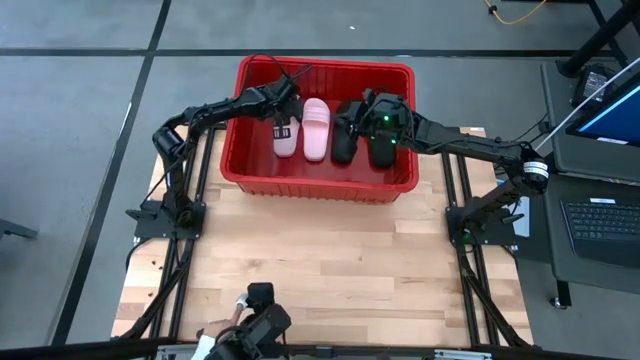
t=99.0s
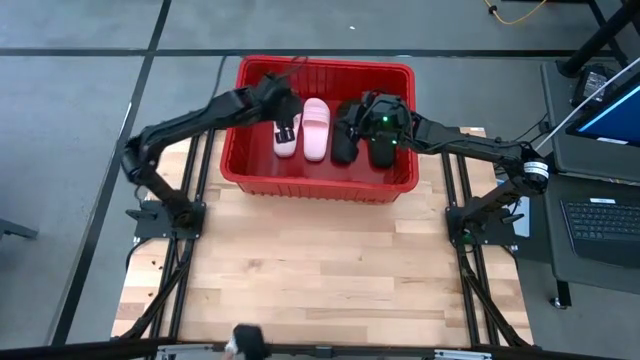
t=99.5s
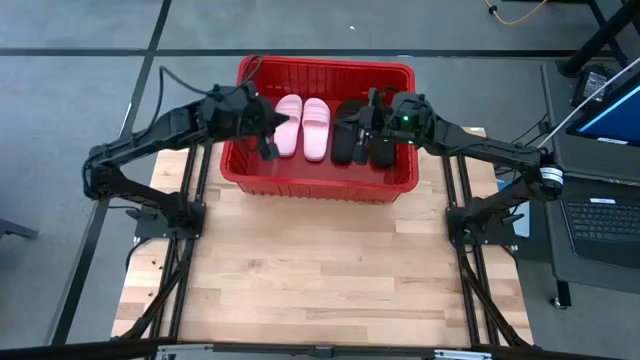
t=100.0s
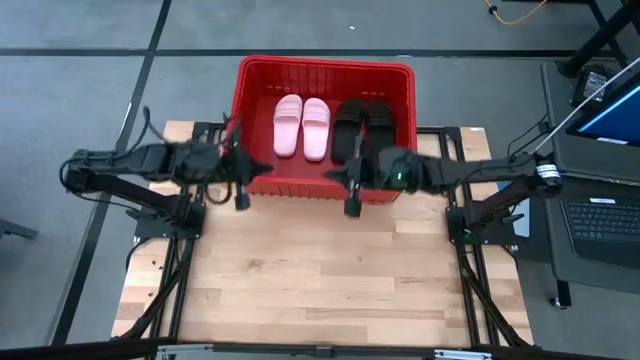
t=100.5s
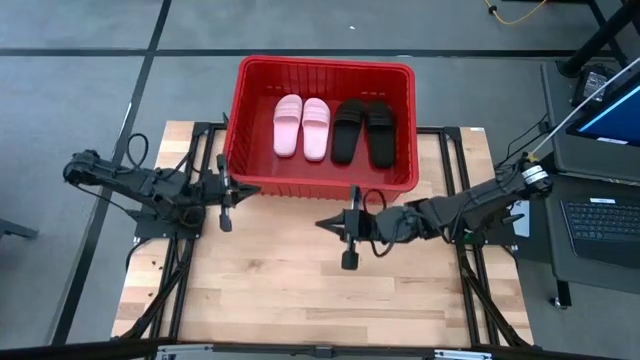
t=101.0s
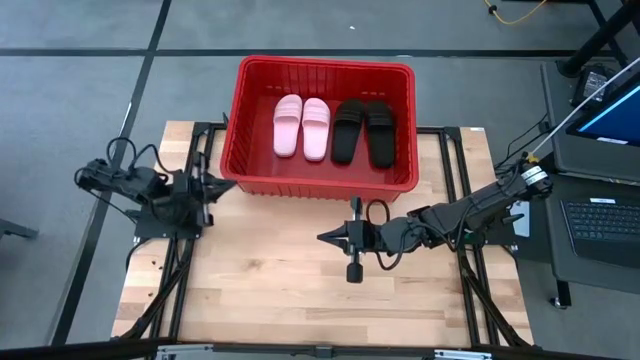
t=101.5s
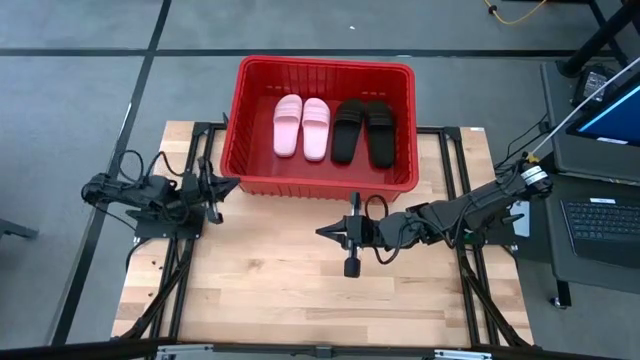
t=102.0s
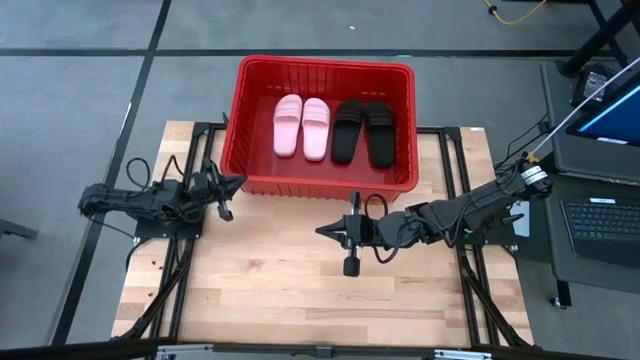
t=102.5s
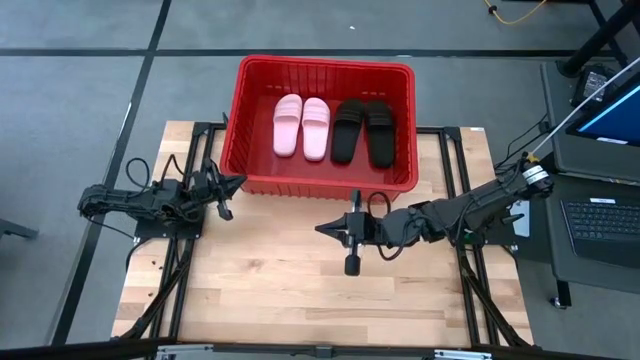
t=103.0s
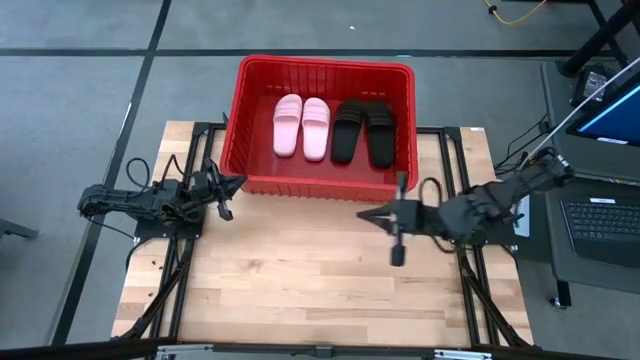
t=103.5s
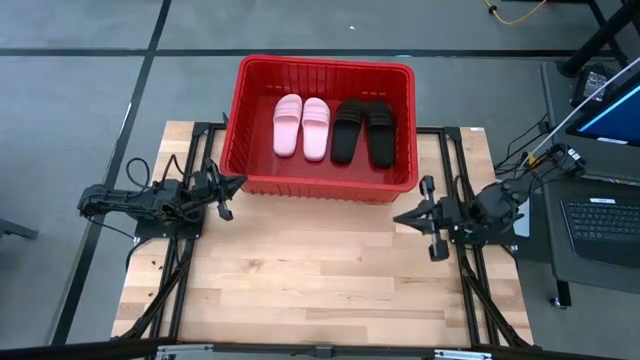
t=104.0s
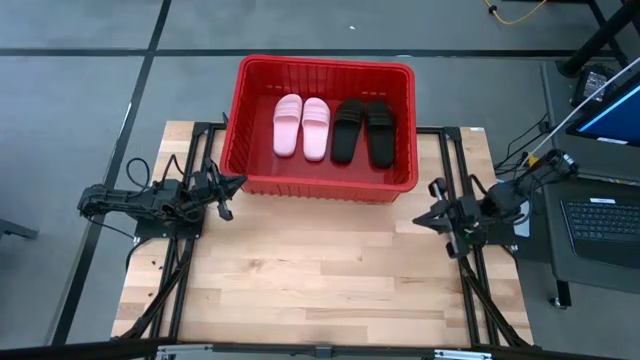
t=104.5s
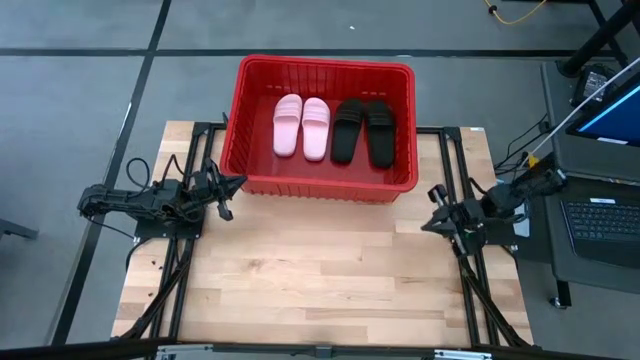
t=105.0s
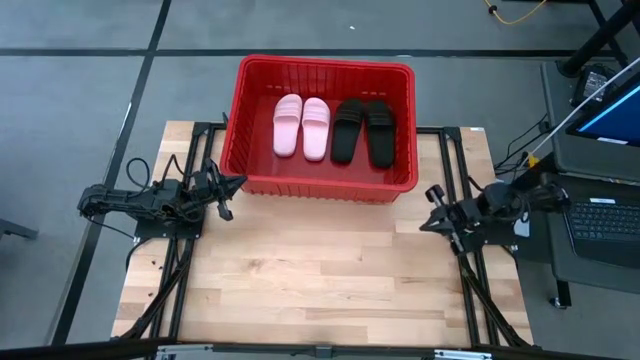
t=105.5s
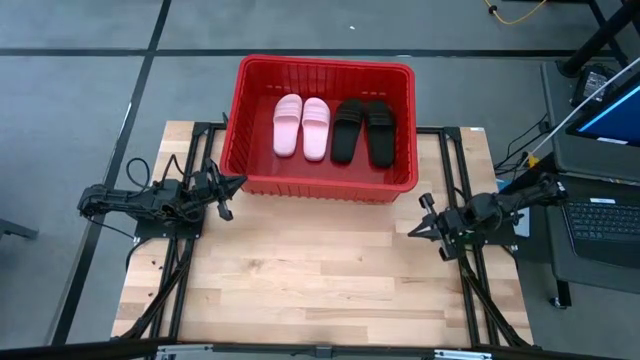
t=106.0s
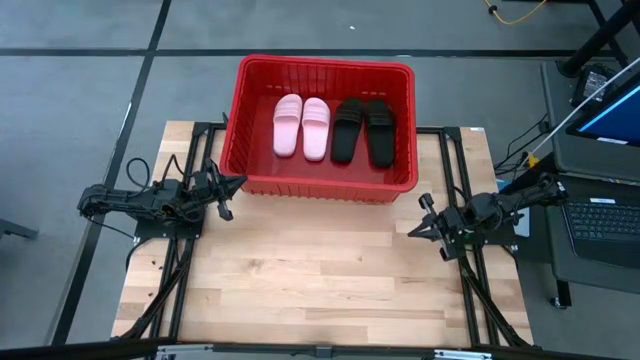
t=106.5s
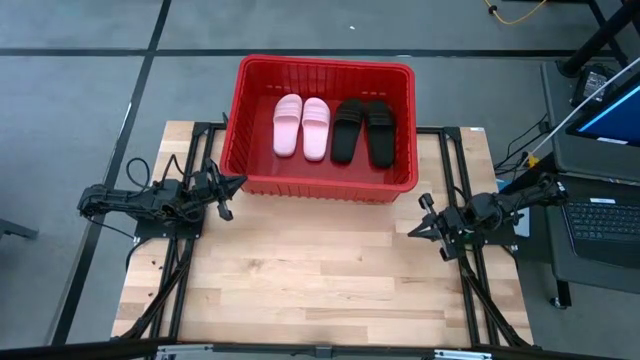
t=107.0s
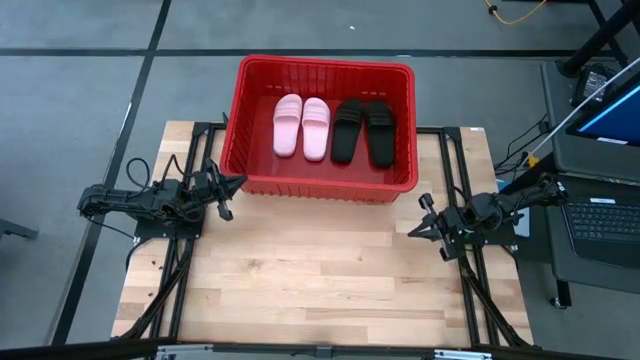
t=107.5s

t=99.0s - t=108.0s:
Task: Pick and place slides into bin
Return to Home Position

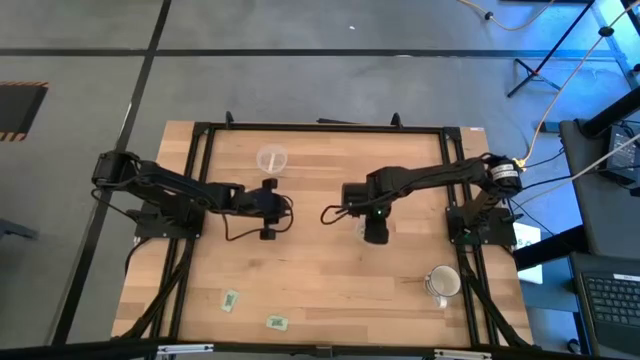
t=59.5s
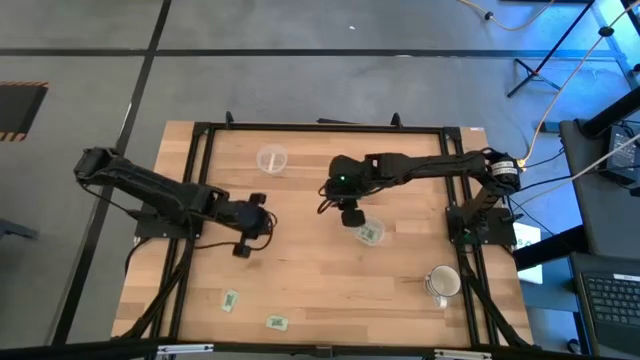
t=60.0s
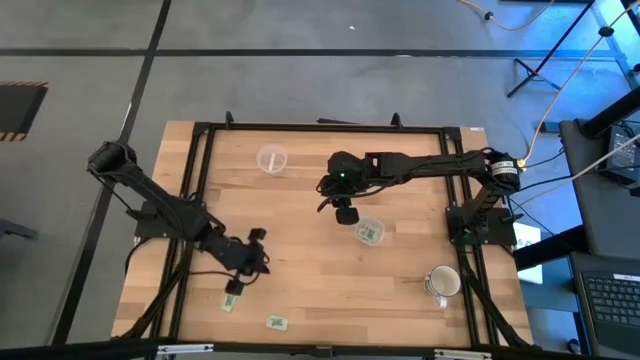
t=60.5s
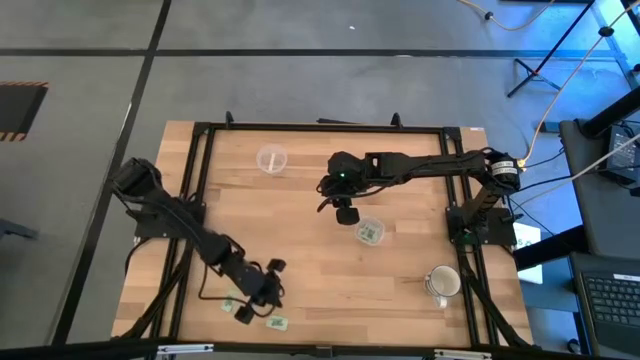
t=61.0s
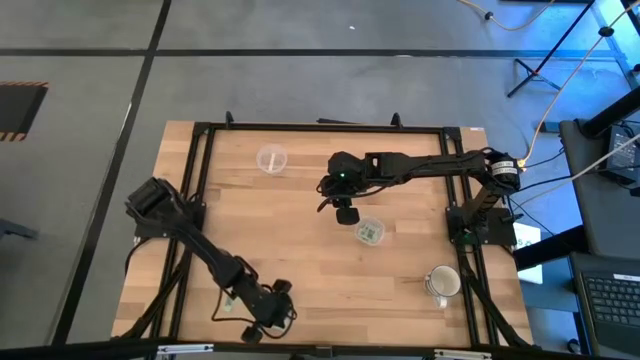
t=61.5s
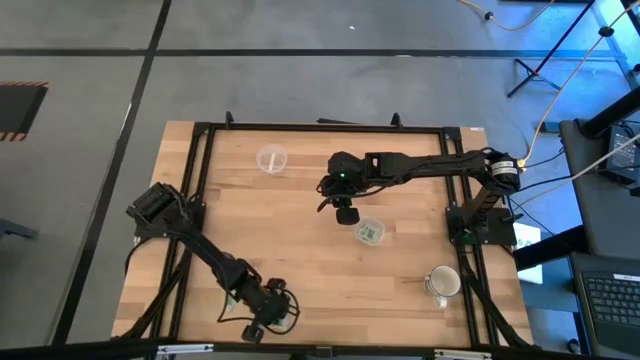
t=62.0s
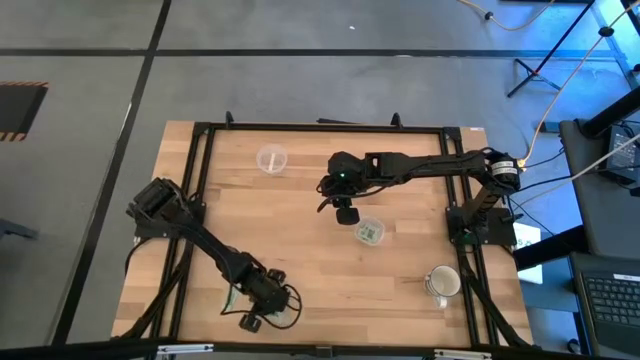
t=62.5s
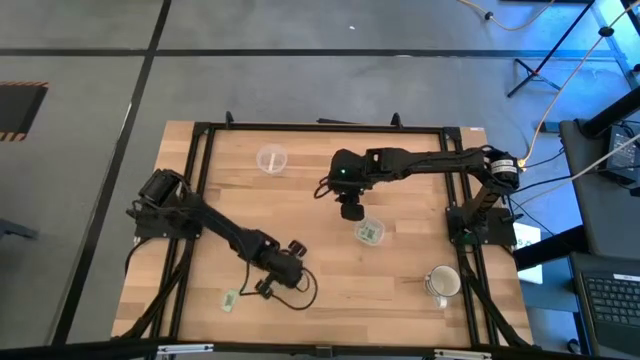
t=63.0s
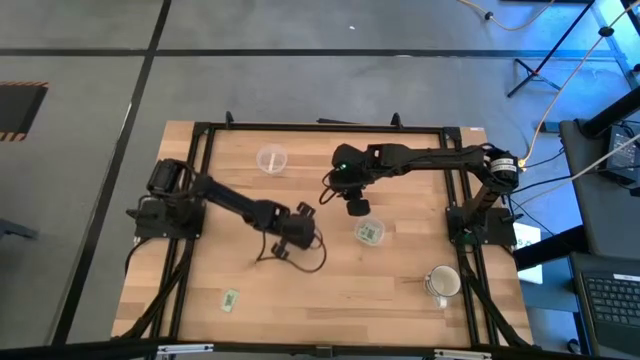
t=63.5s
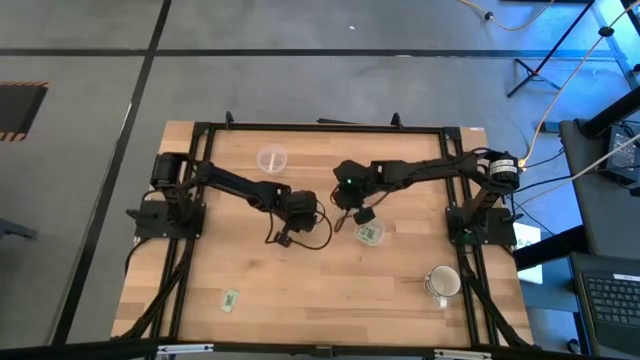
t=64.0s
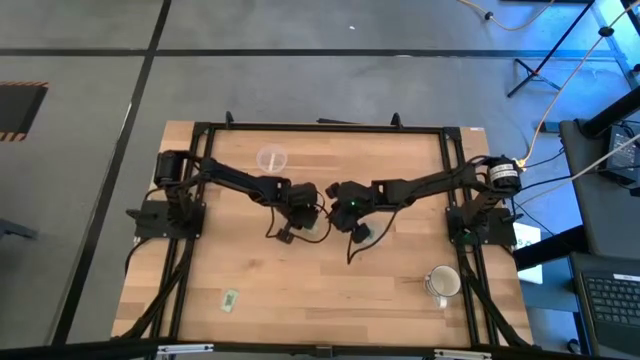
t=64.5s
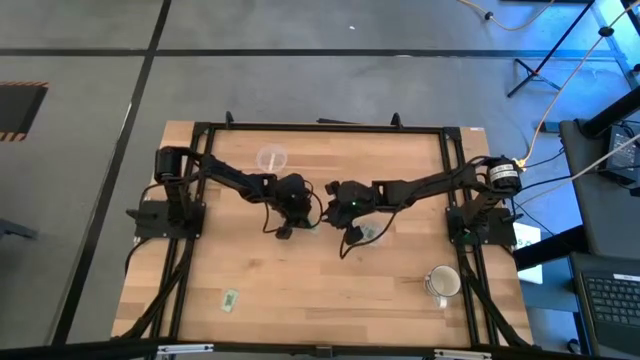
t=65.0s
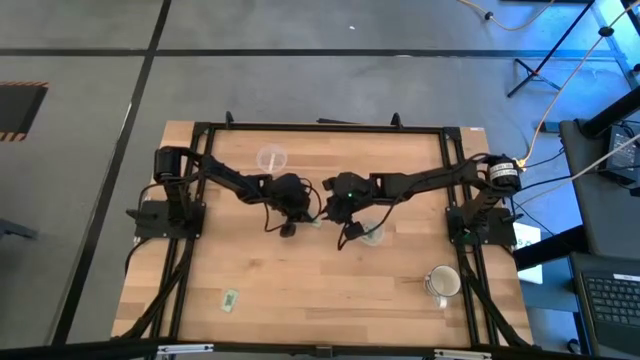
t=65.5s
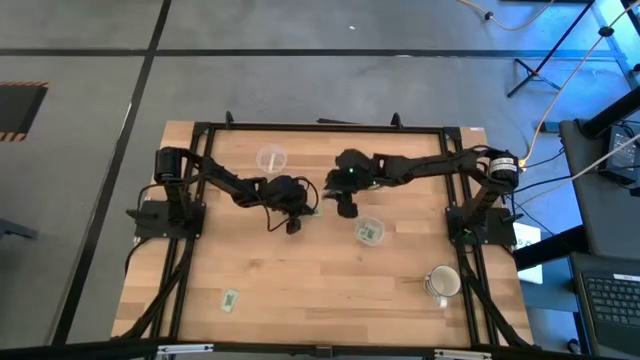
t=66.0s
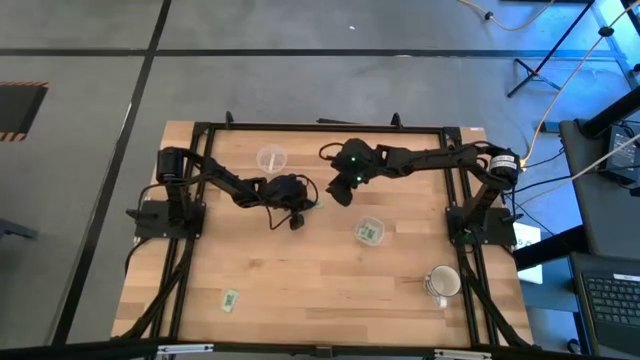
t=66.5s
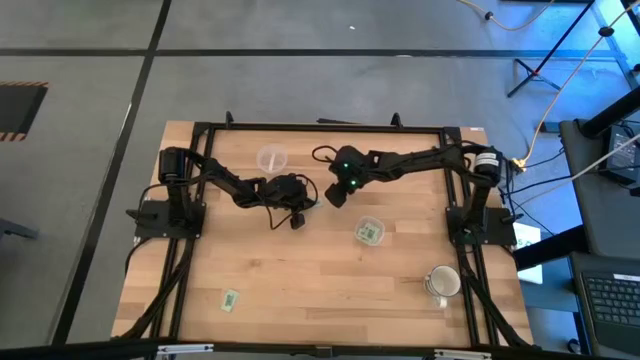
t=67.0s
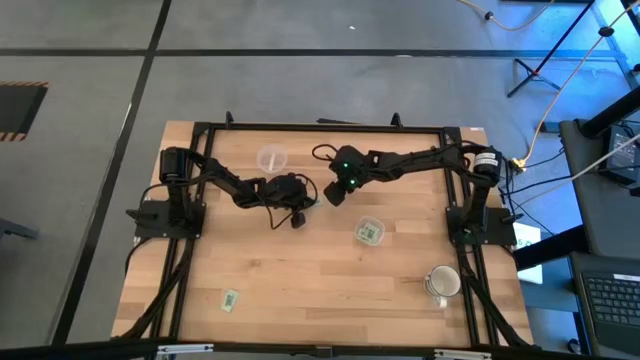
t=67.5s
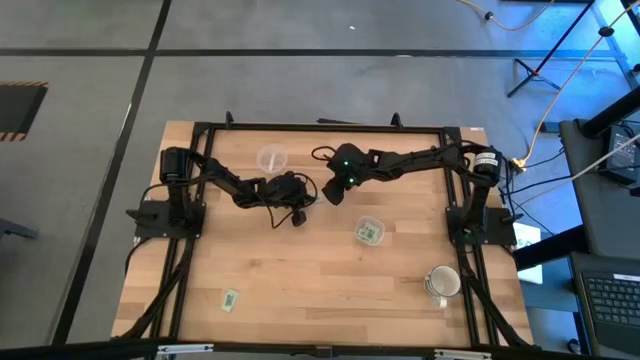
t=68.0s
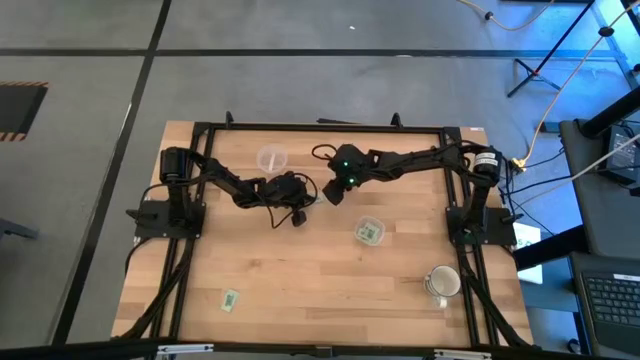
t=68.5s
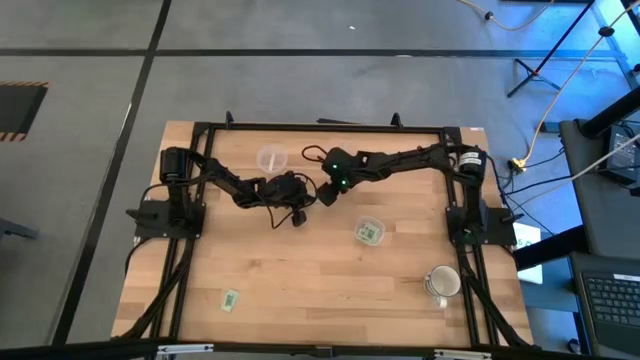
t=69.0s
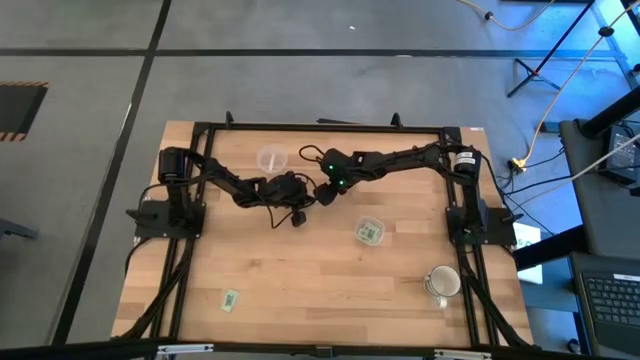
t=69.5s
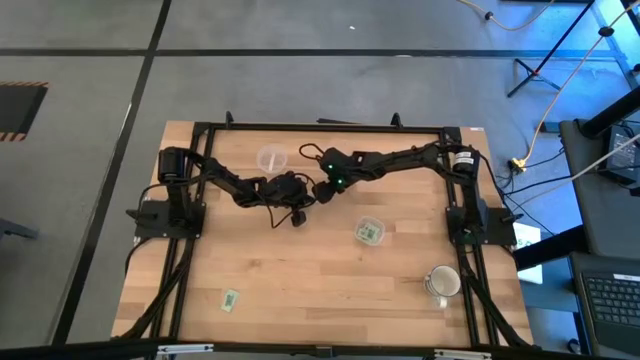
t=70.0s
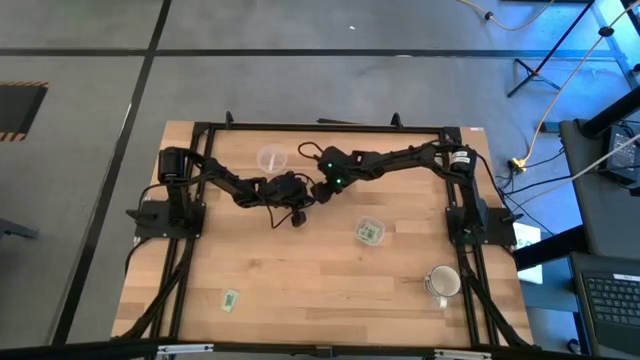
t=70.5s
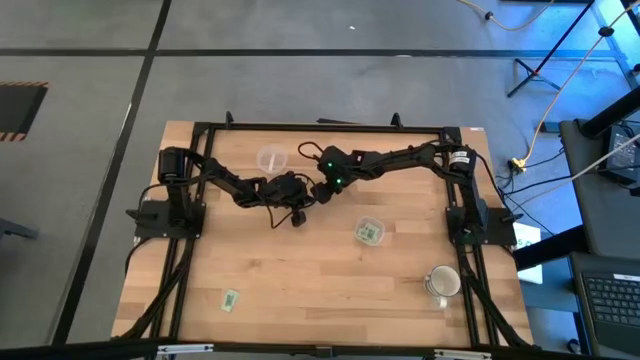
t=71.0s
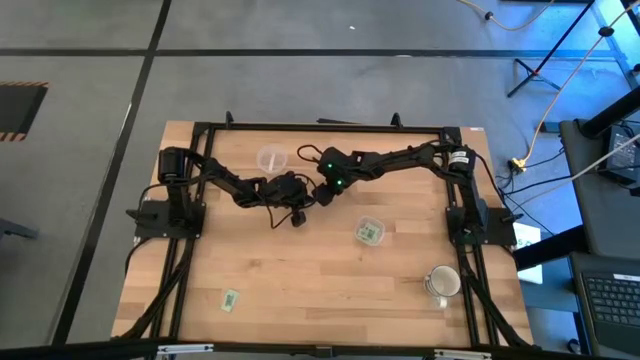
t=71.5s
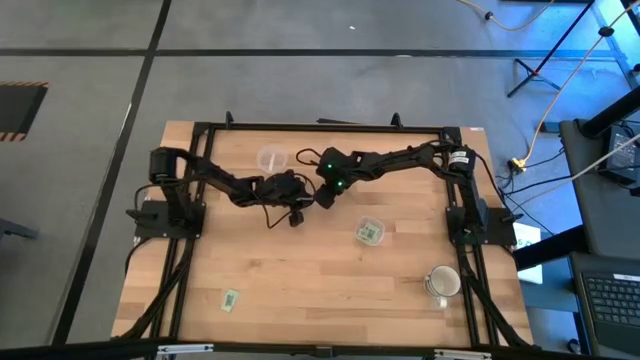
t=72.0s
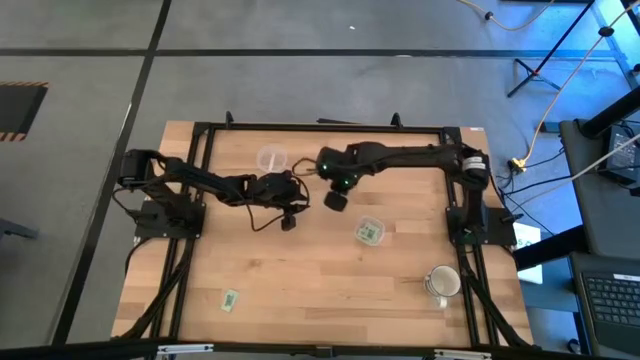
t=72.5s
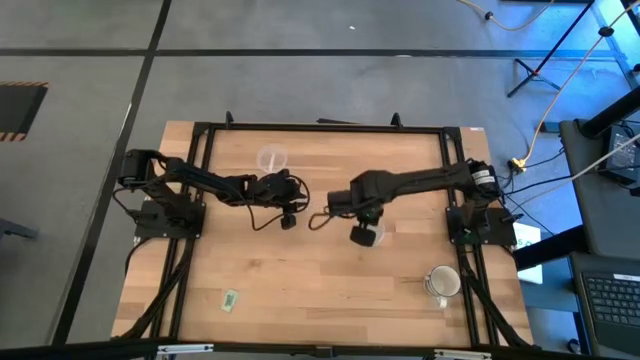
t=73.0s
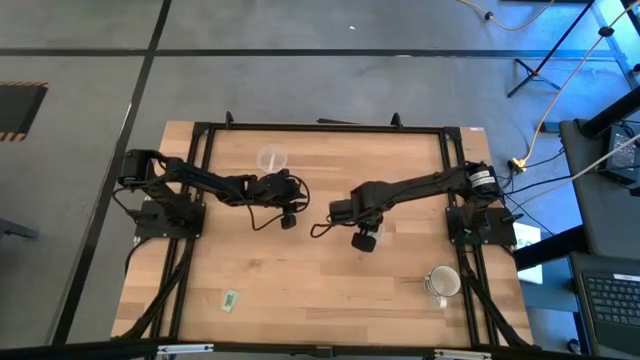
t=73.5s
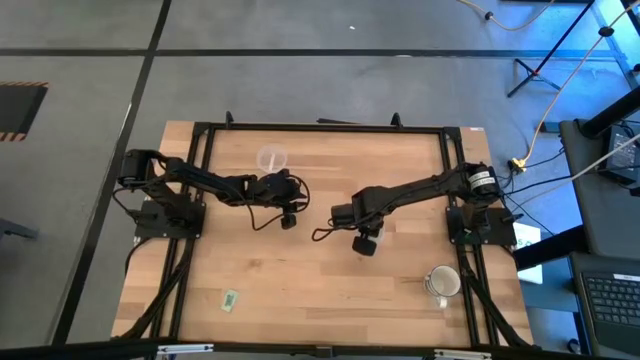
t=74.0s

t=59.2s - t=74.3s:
Task: Pick and place Stevia / Truvia into bins
Put the stevia packet into the bottom transparent container
